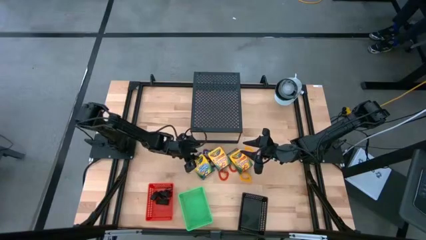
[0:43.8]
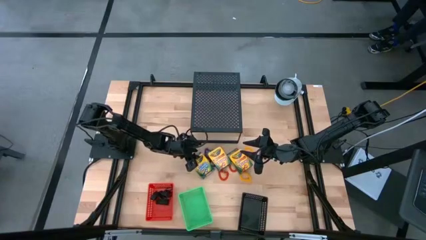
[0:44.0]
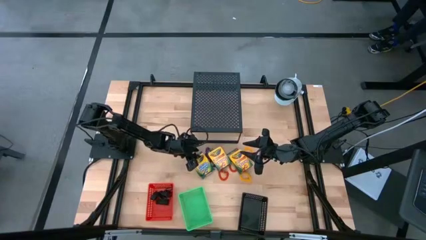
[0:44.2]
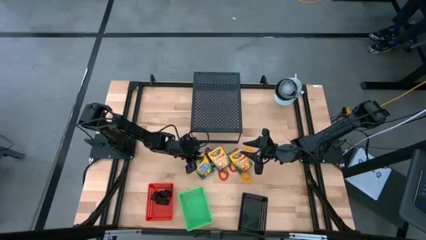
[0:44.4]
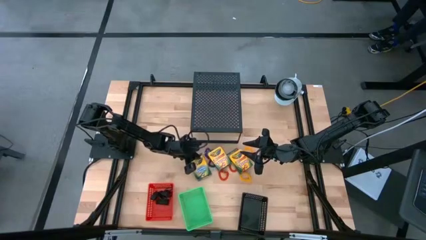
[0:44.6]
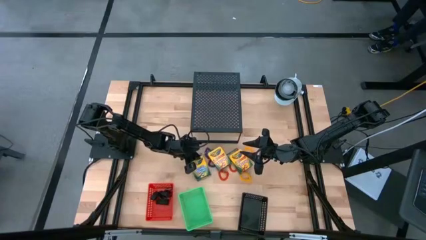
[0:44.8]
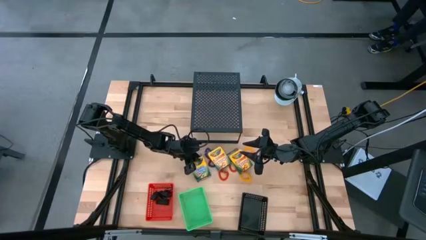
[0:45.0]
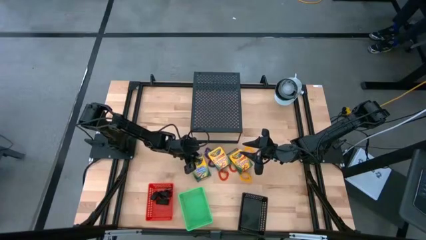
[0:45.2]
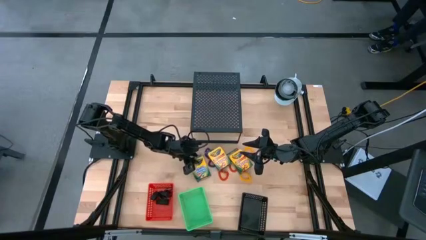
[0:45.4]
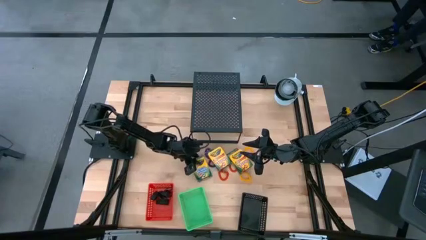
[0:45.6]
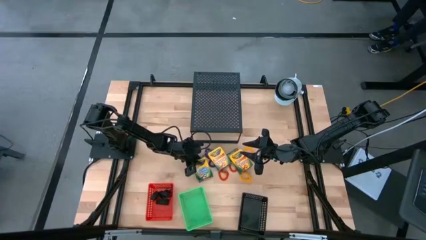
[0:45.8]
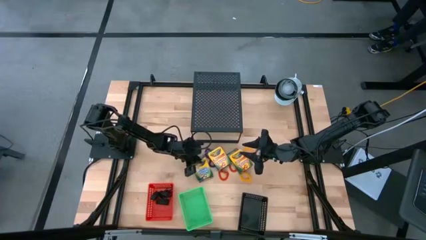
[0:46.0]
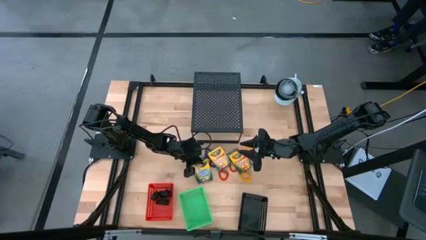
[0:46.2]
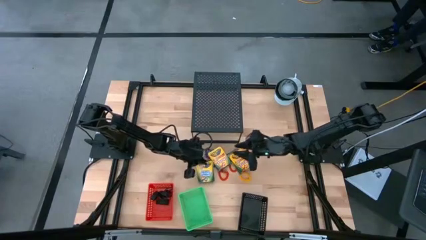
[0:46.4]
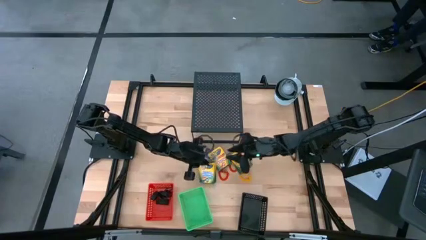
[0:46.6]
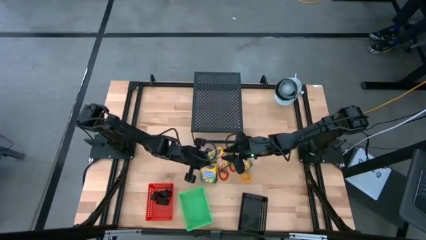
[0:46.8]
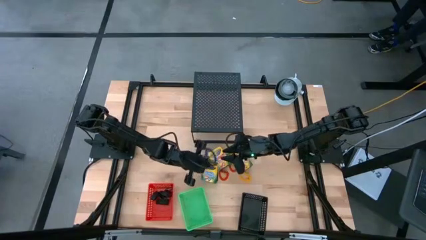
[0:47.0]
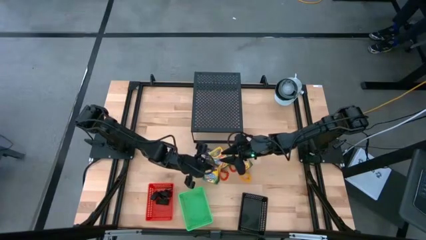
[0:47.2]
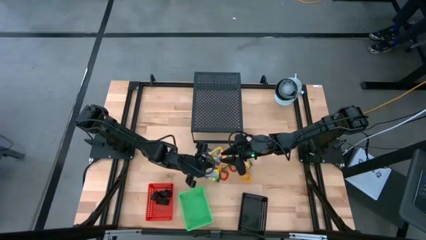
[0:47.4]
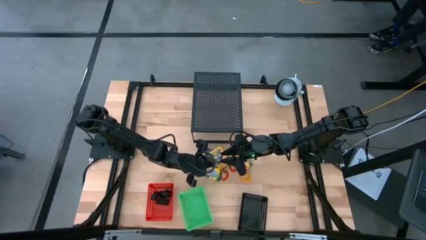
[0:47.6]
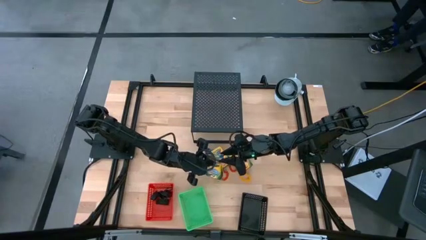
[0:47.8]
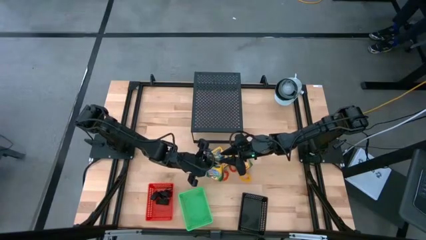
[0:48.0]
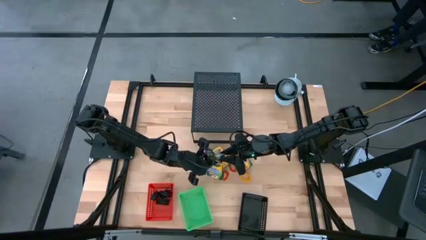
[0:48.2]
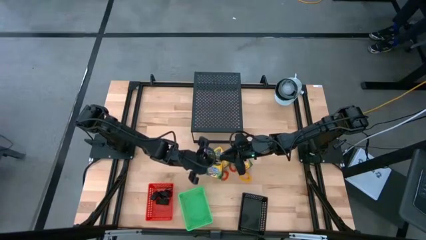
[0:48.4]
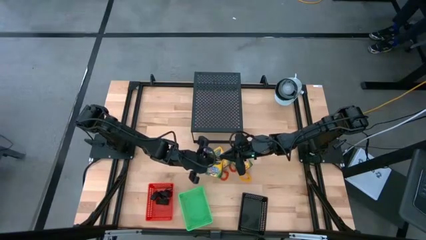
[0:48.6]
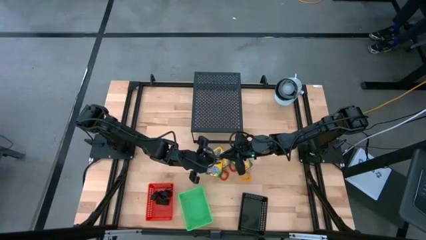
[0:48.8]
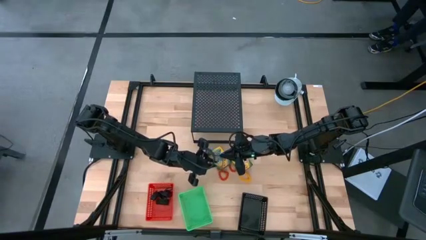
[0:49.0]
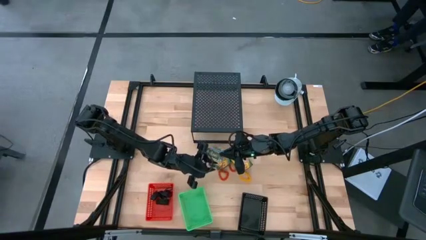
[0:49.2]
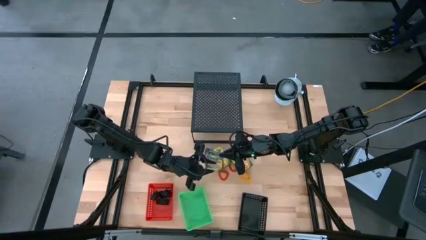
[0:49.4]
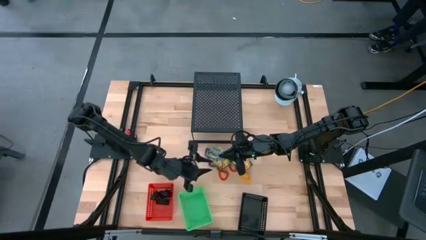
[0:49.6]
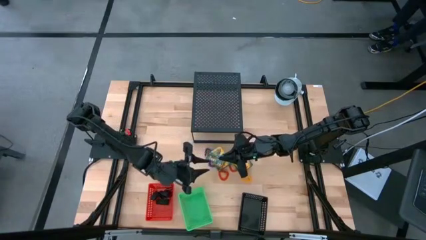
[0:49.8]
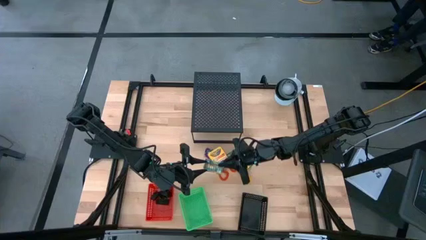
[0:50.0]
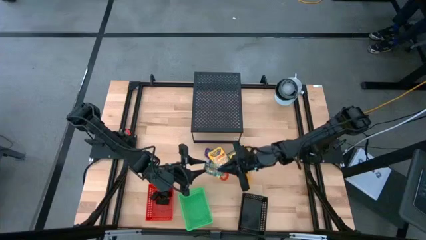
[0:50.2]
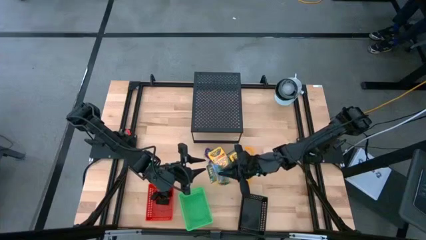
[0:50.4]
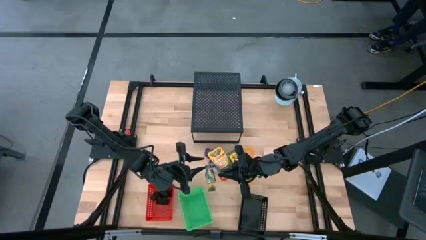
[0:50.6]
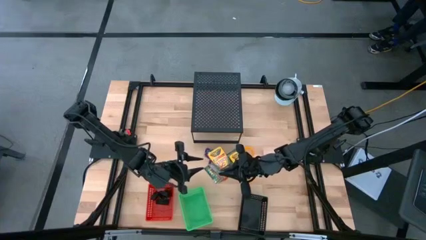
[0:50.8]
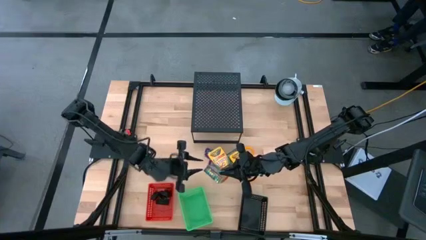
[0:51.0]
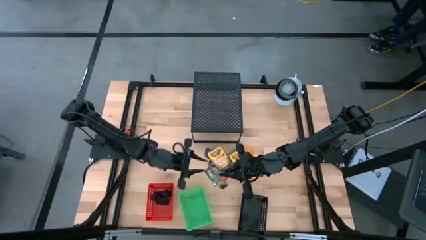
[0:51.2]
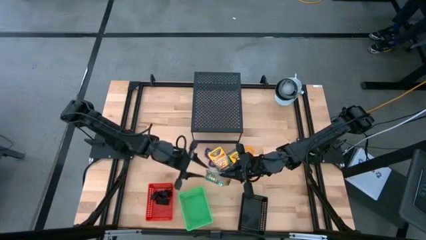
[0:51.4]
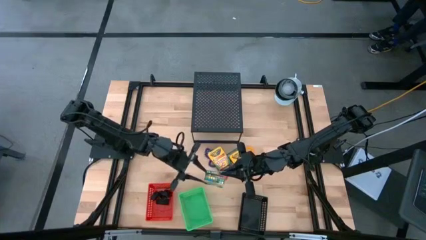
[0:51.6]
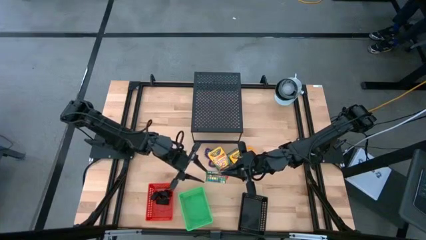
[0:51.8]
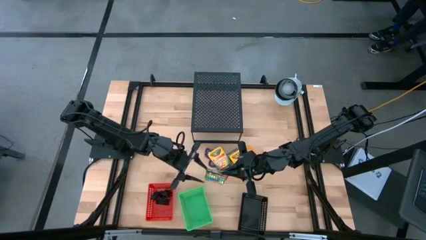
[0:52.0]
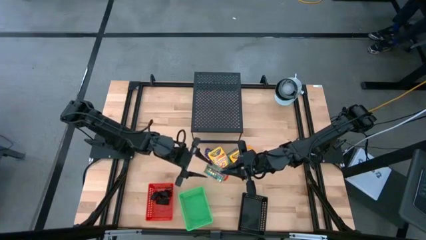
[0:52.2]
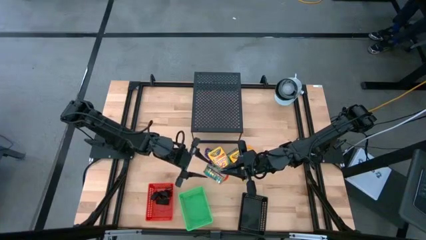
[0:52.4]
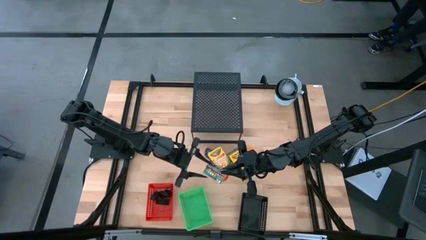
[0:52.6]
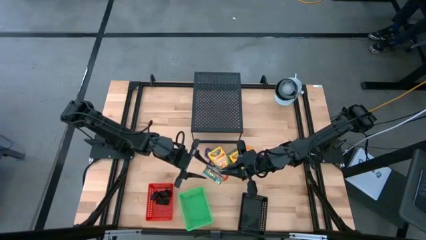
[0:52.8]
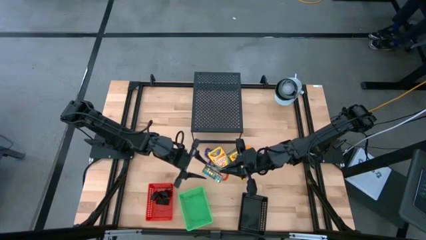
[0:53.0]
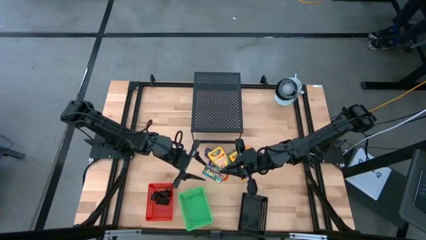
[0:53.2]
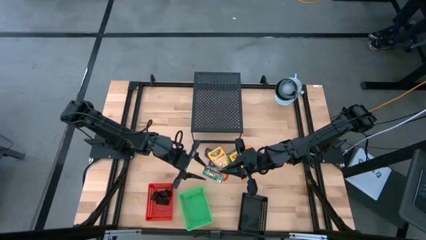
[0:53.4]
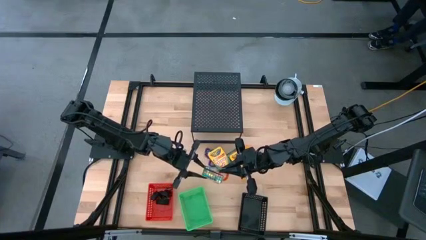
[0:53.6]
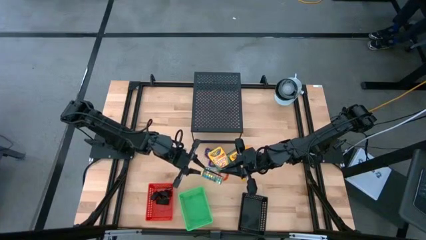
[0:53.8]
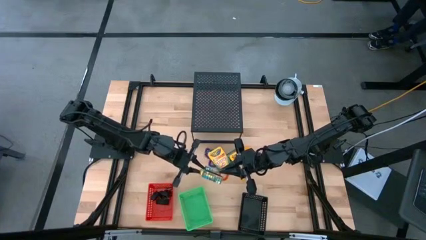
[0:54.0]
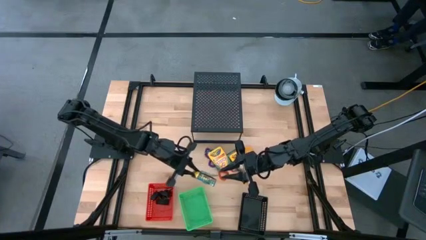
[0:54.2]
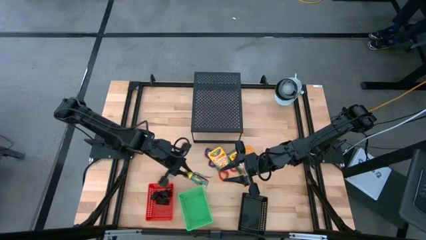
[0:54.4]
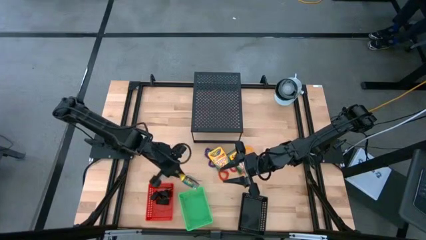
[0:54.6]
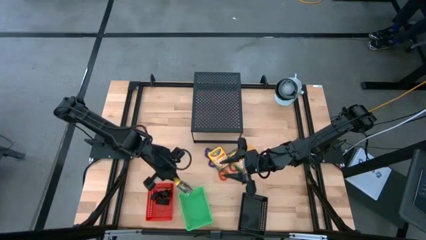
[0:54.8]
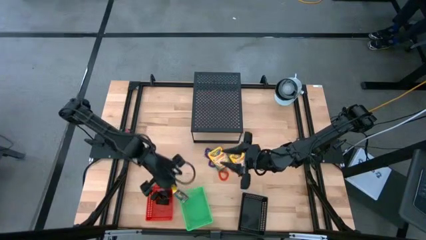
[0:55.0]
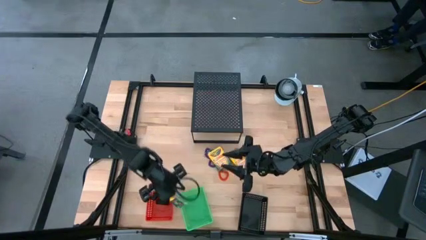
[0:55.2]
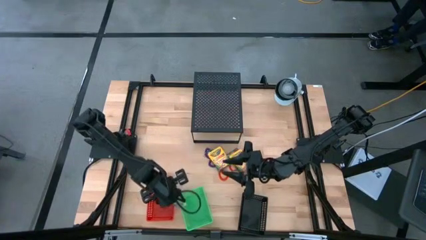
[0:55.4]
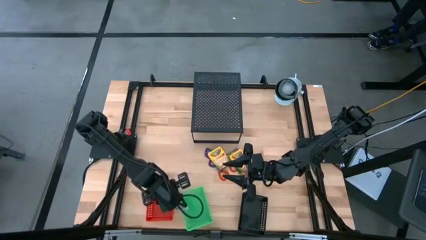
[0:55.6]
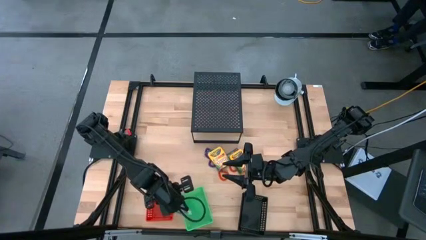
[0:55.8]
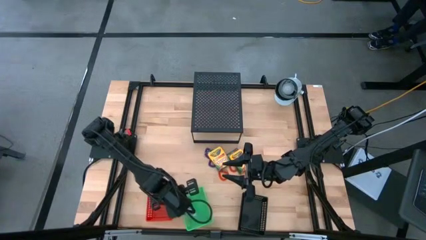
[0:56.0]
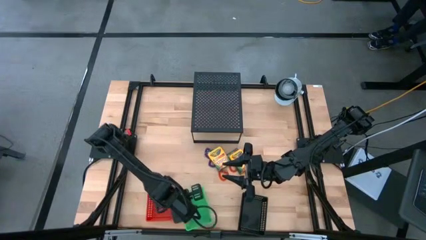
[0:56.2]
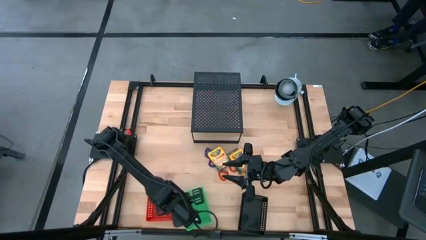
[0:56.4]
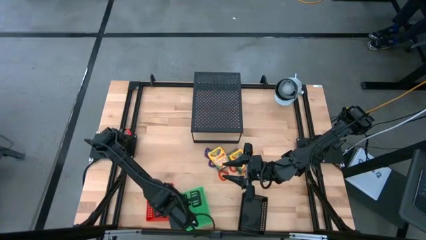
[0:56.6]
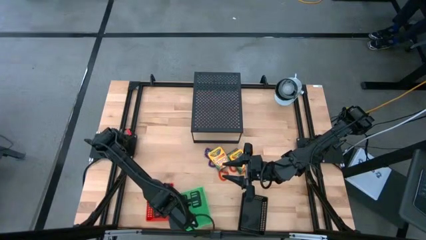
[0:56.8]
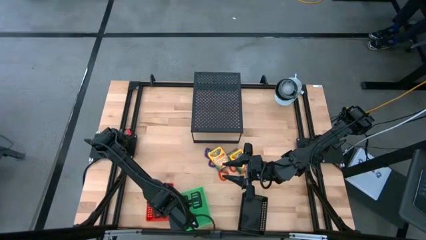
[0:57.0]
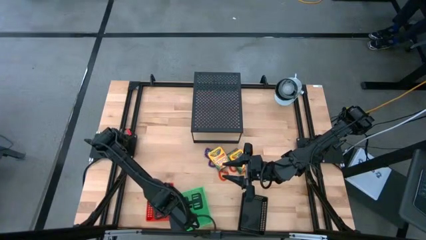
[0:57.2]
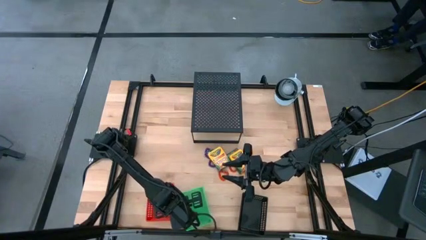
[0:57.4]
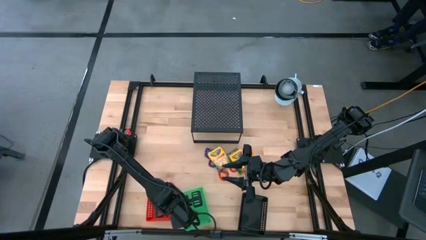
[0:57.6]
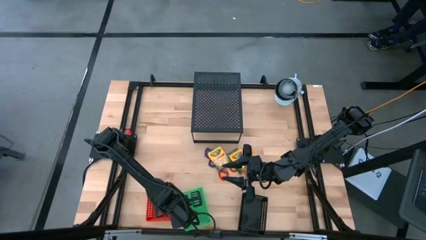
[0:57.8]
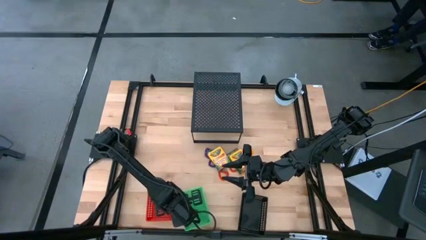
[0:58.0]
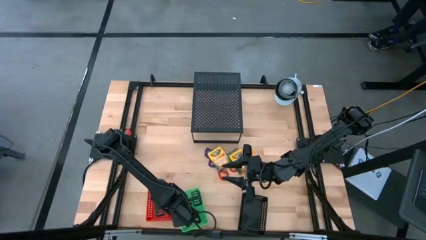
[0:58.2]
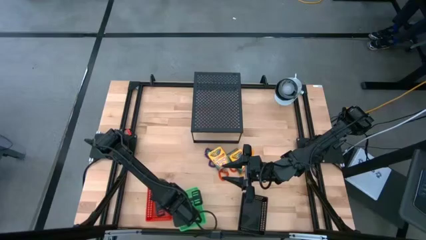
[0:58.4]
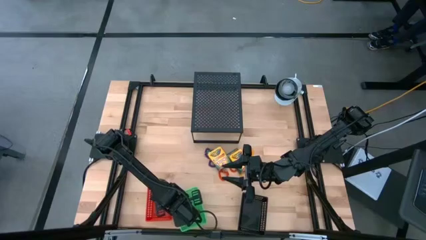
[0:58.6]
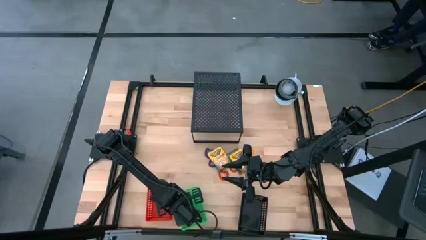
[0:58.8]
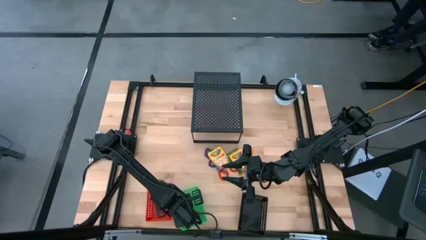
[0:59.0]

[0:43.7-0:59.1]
Task: Pick & Place Office Desk Supplies
Put the crayon box into the green bin
